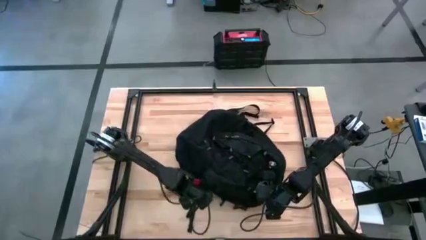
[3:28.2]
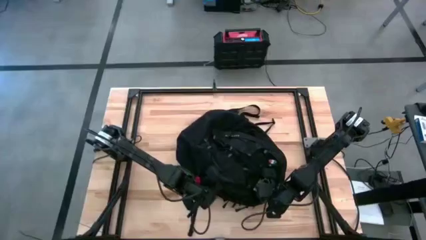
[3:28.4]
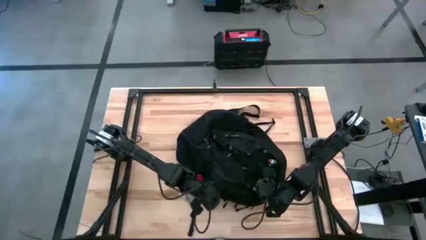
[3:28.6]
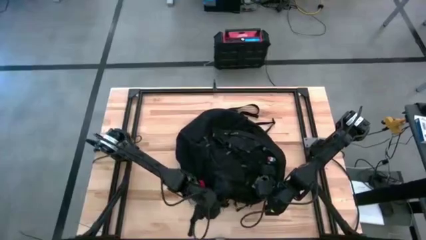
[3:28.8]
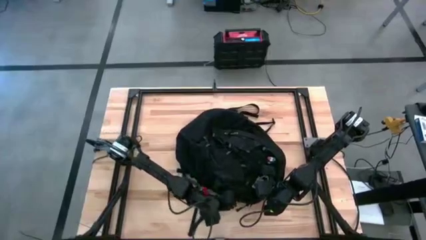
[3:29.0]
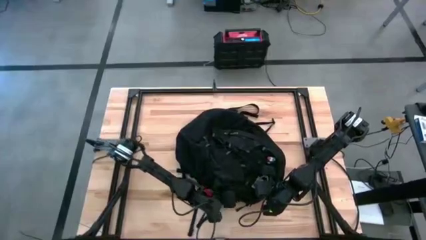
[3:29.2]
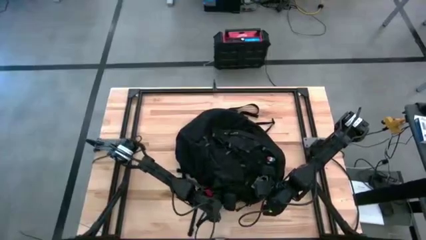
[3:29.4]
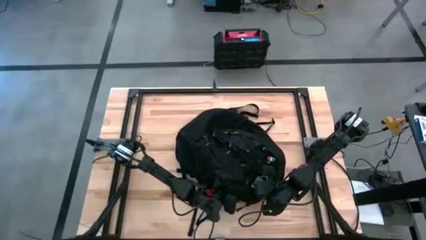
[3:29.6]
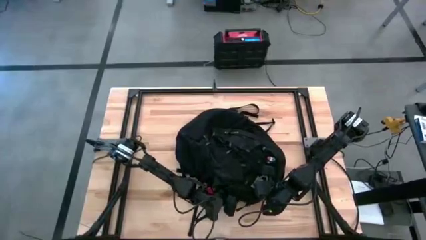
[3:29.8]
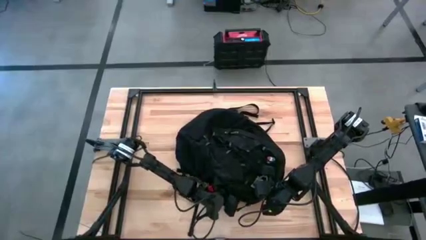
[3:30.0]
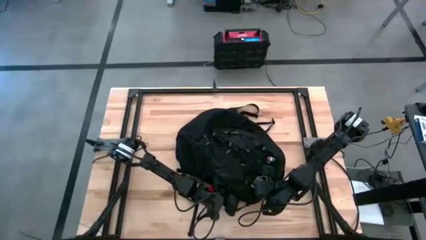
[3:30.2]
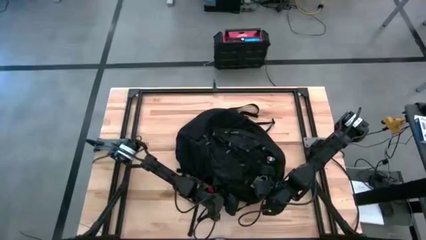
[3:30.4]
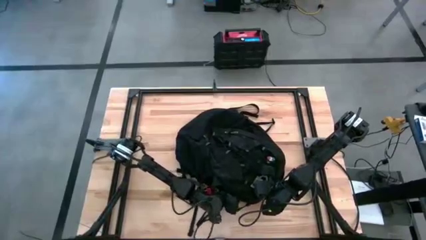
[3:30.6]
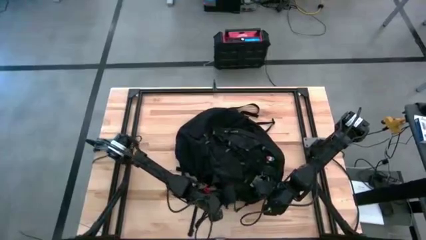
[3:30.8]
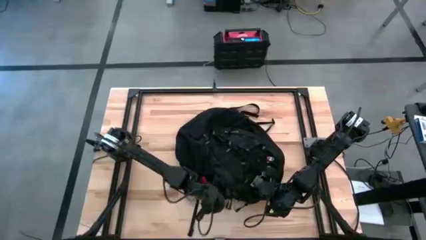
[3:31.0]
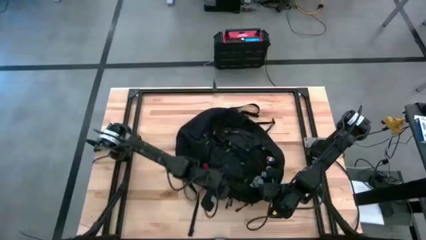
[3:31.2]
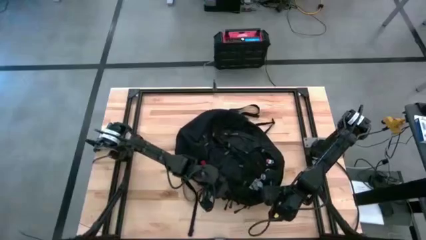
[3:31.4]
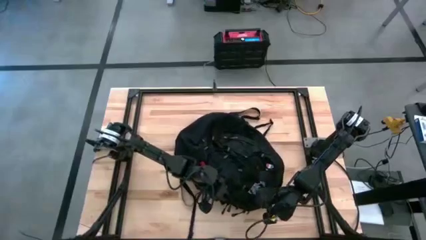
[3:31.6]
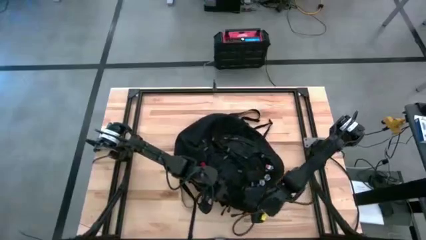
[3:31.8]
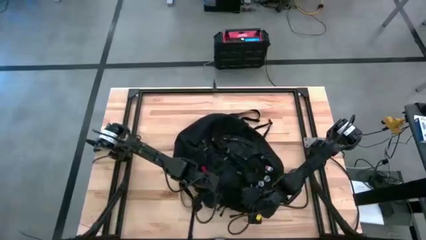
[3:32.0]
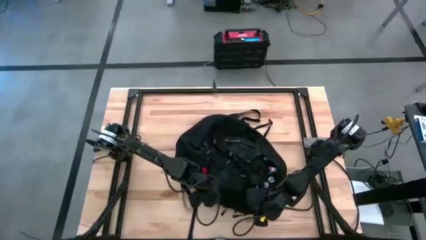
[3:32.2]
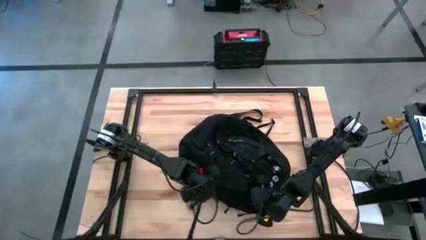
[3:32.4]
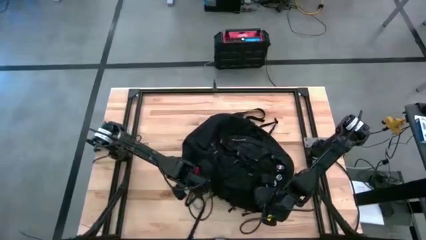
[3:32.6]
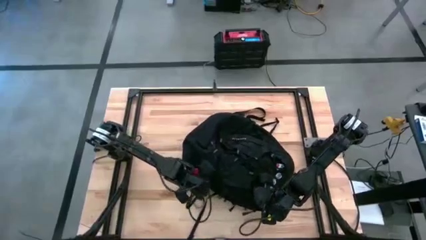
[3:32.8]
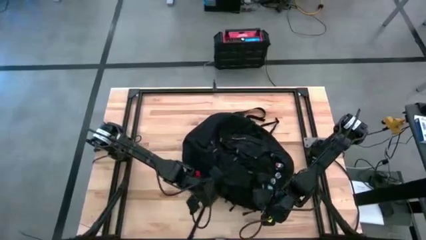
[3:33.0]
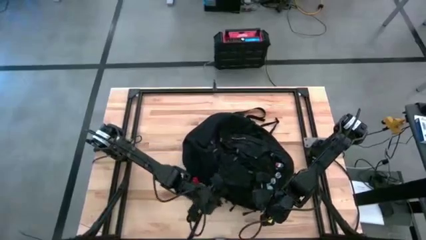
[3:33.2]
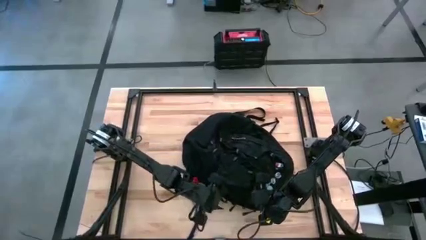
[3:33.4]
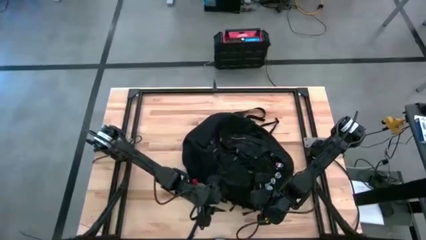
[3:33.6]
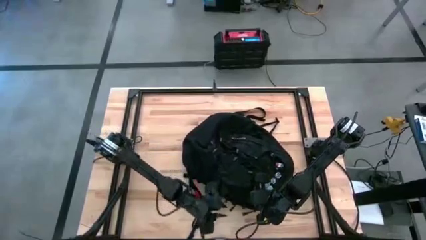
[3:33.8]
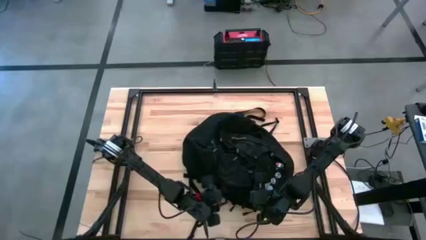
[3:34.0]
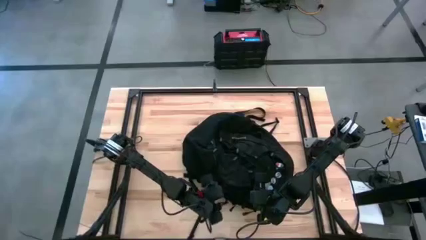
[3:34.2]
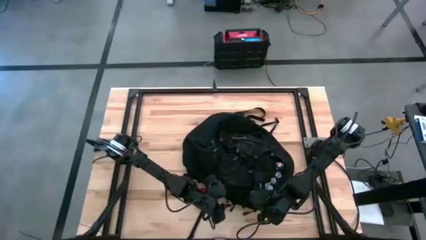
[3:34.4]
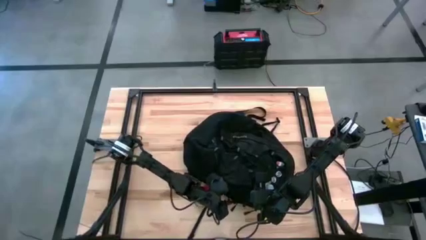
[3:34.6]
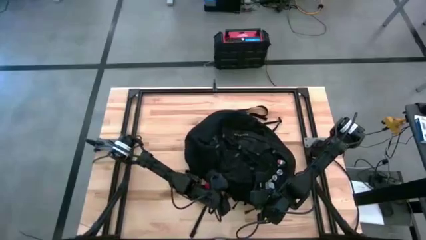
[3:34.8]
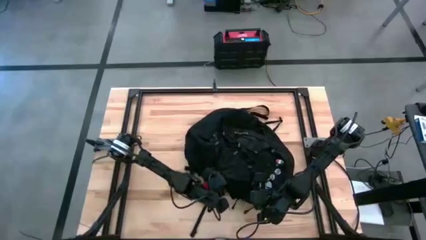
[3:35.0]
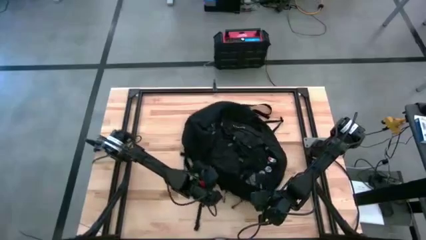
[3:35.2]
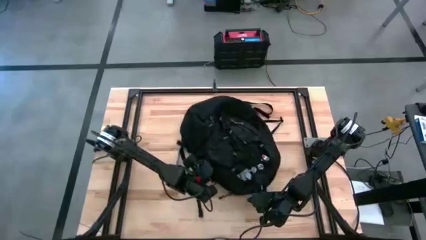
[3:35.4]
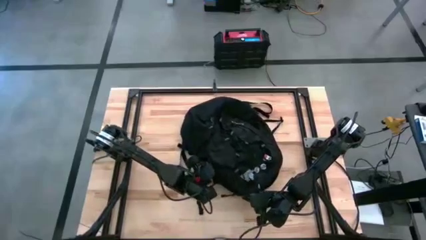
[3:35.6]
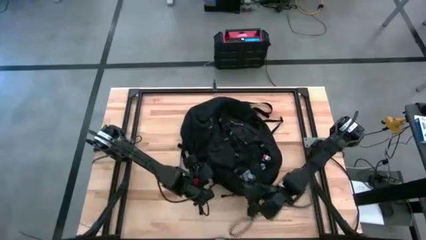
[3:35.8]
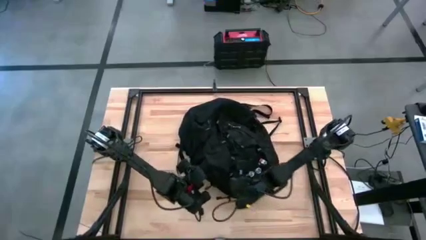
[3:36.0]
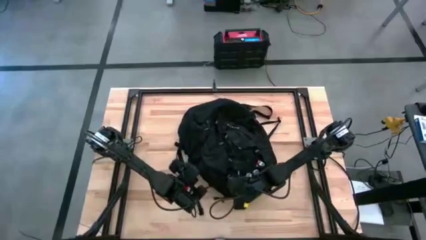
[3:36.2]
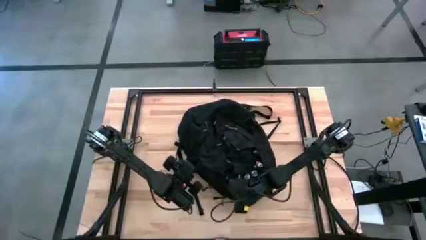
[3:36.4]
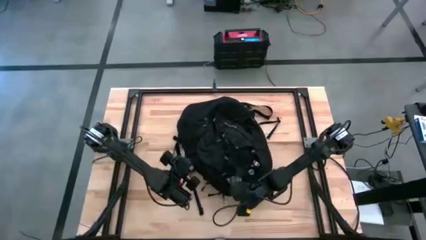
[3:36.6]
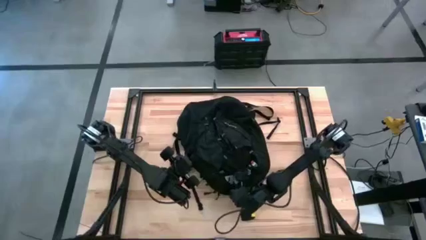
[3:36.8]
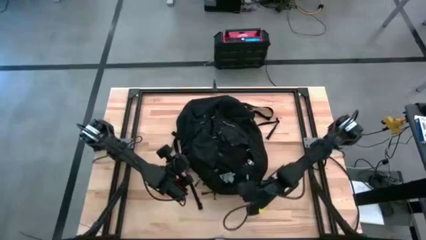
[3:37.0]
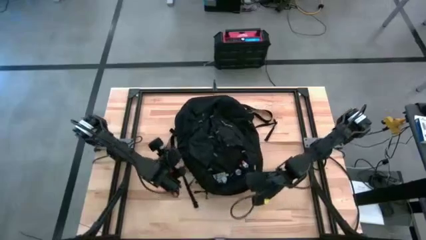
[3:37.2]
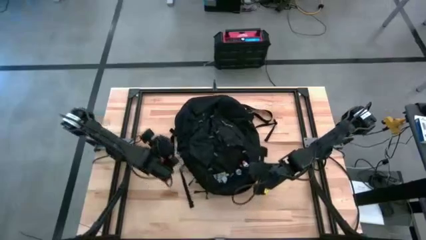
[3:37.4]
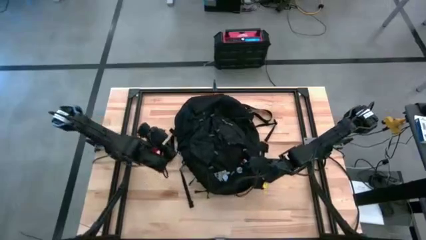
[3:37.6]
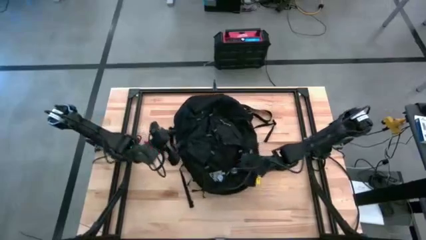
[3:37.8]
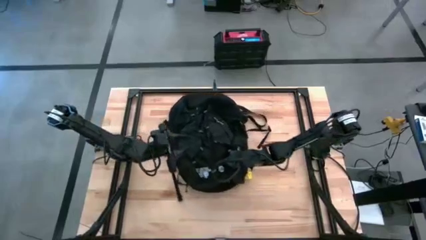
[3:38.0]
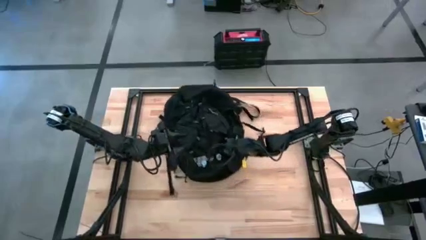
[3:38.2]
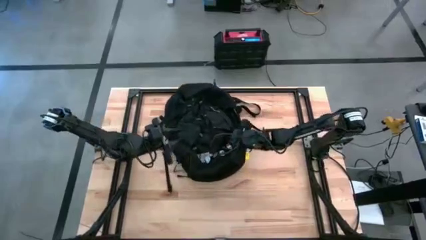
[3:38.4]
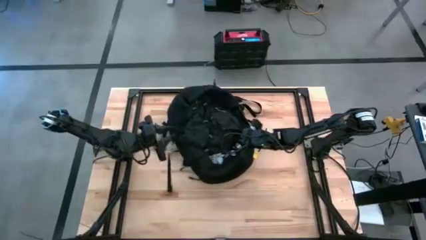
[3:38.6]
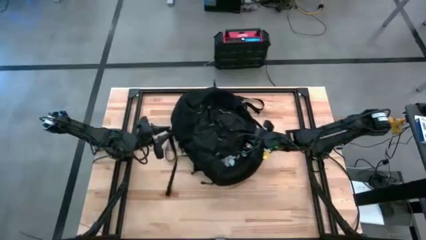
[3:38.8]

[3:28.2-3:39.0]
Task: Unpack backpack
Close the black backpack

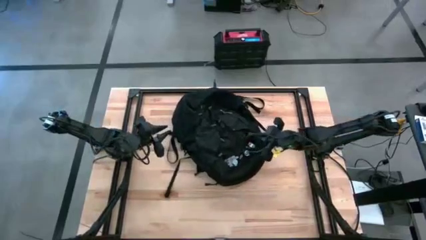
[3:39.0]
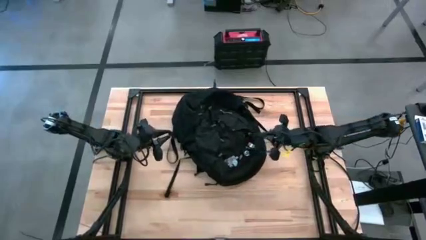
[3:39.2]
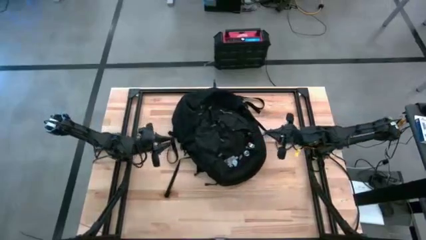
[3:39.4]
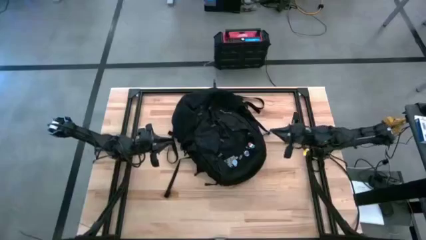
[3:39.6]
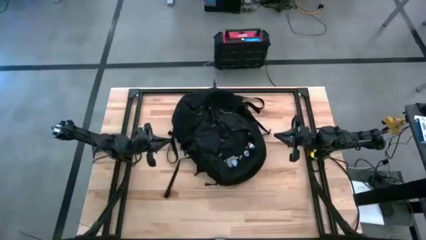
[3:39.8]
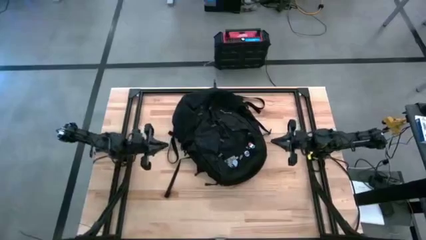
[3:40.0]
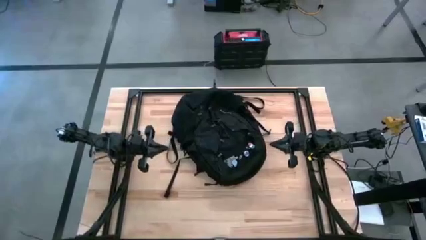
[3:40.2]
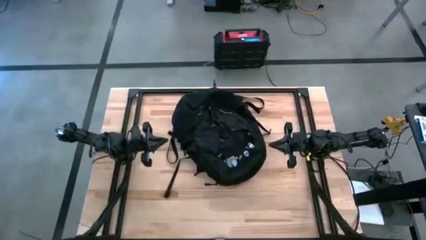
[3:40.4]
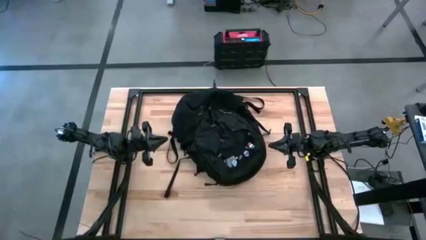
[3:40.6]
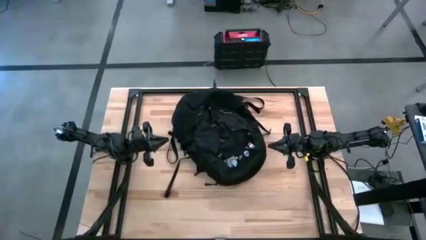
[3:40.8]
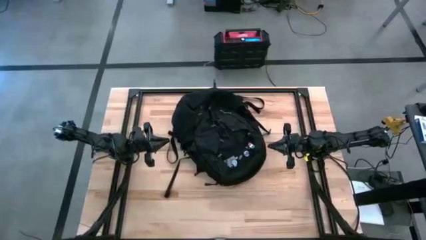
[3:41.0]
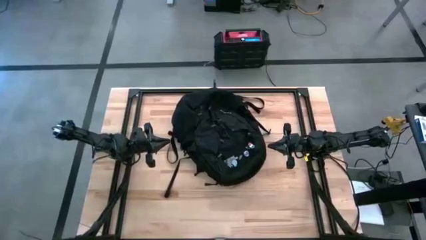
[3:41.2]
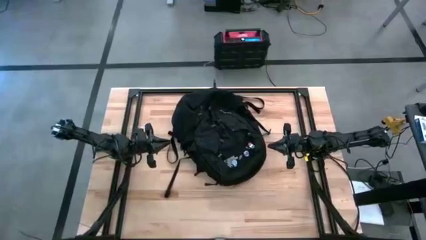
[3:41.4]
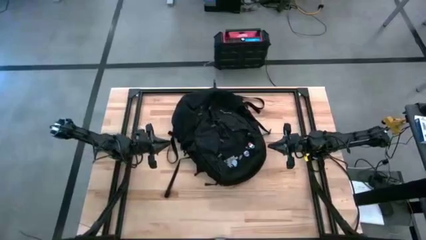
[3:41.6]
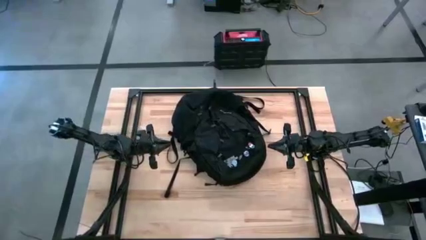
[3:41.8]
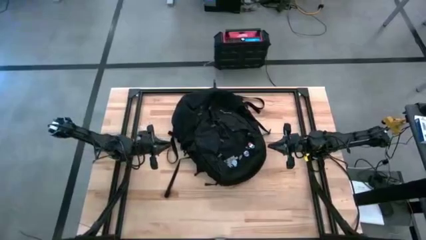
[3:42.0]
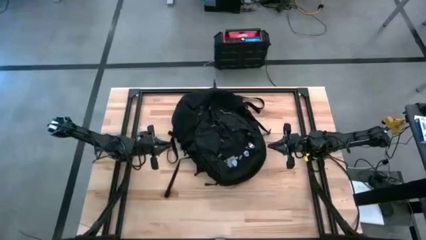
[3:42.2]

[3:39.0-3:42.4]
Return to Home Position

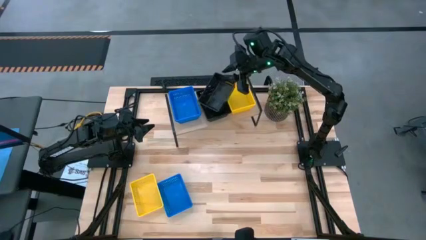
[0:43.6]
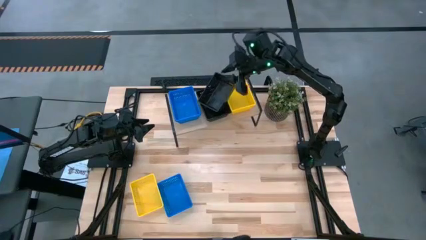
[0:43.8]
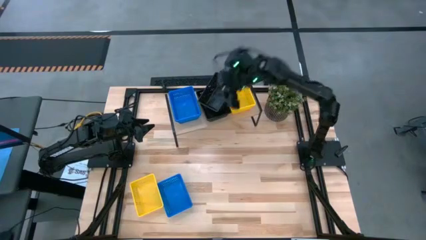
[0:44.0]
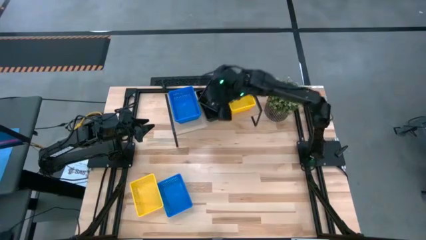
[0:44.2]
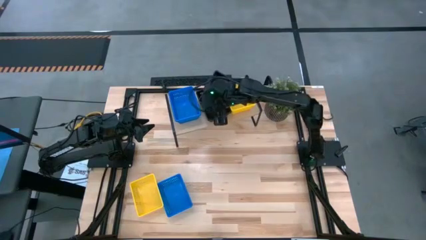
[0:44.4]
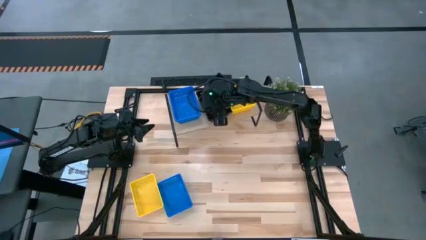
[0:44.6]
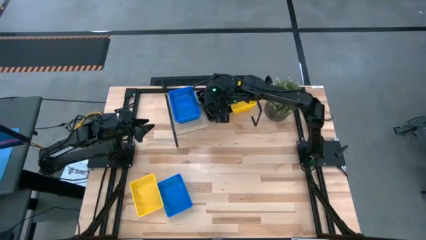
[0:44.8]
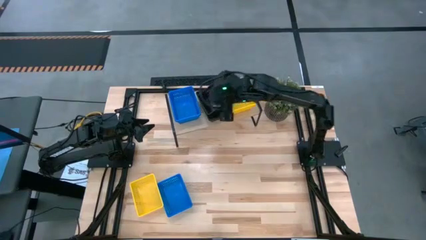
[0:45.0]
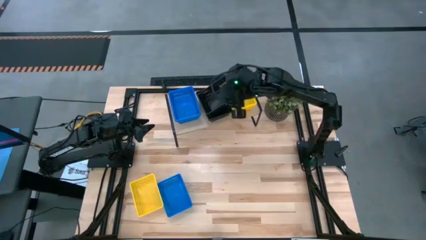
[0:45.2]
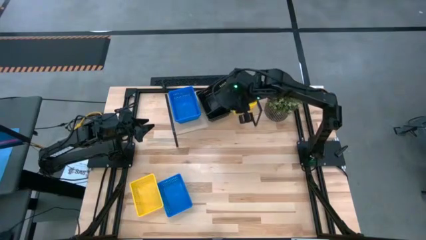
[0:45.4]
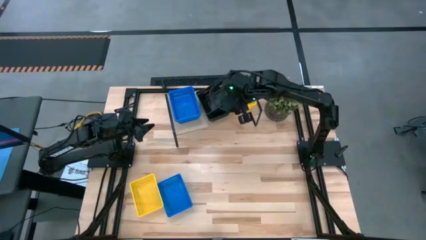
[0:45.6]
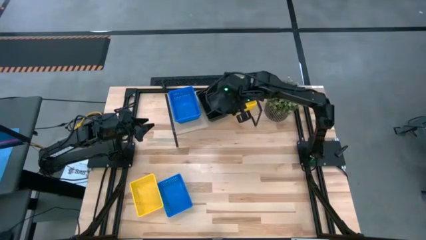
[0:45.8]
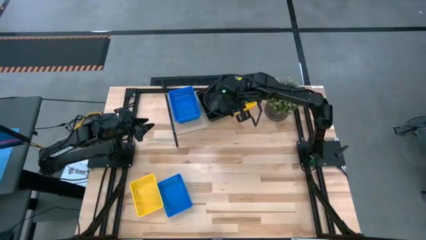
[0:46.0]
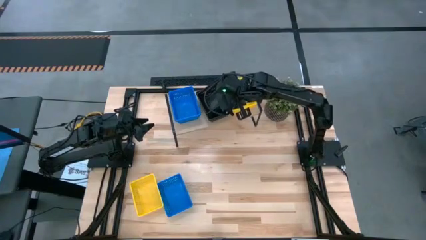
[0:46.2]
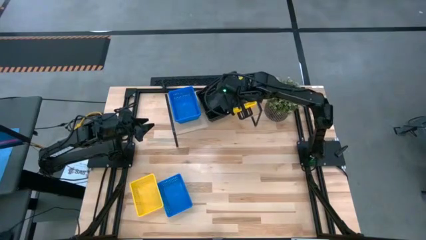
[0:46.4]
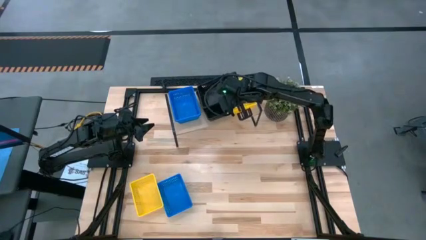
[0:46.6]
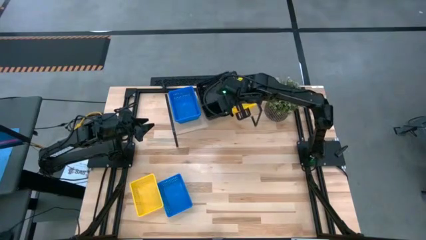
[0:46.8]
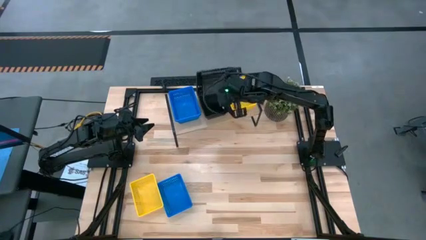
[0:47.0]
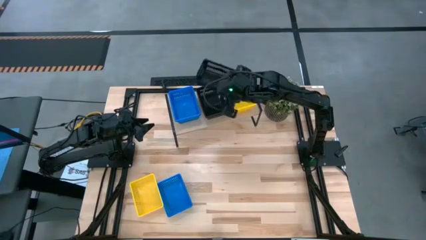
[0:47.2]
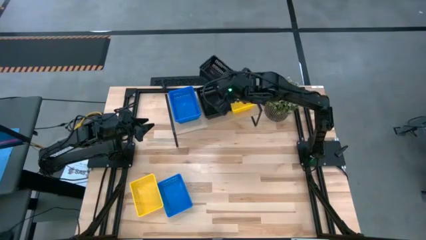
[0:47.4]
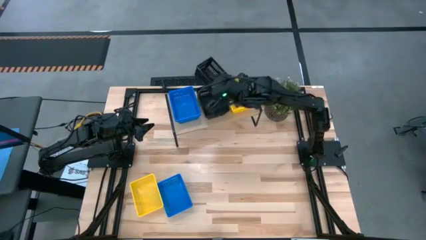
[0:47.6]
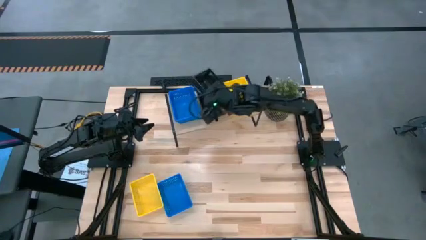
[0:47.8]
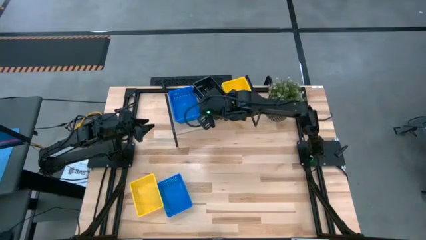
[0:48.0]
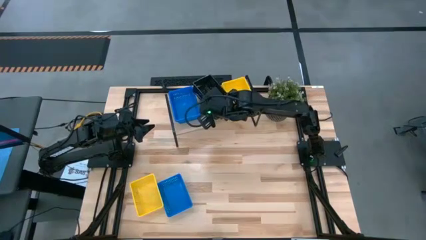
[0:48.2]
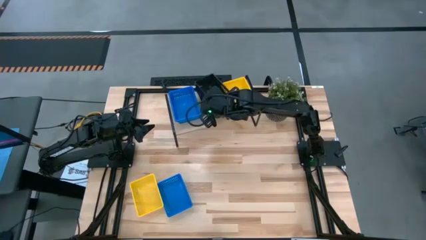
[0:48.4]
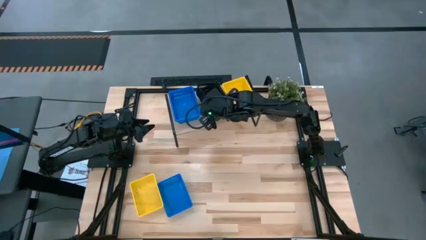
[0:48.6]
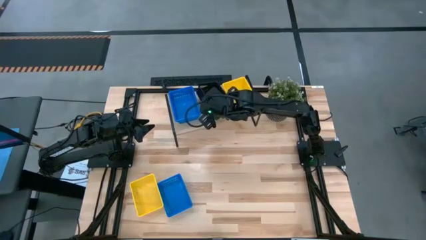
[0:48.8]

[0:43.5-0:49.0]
Task: Stack baskets on shelf by color
Stack the black bin on the black bins on the shelf
